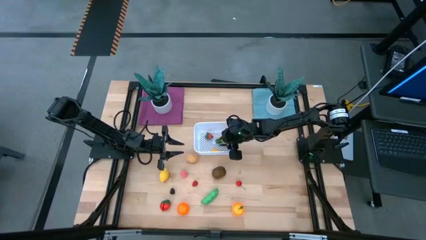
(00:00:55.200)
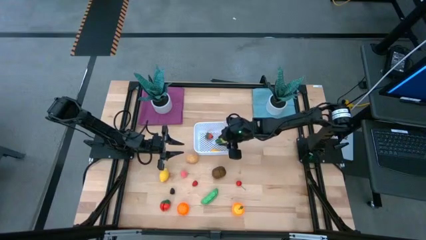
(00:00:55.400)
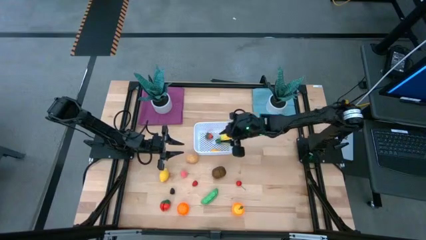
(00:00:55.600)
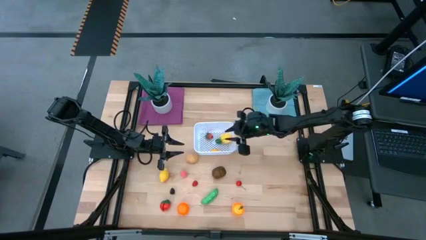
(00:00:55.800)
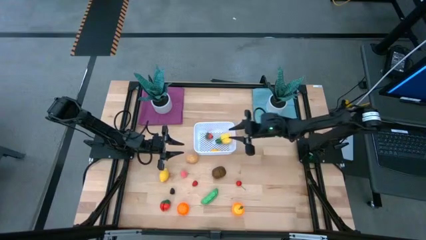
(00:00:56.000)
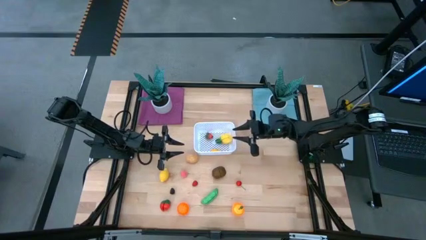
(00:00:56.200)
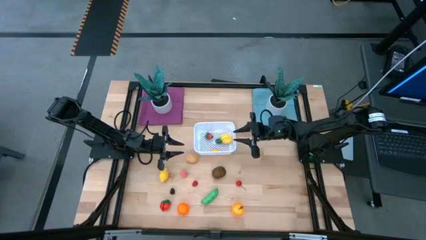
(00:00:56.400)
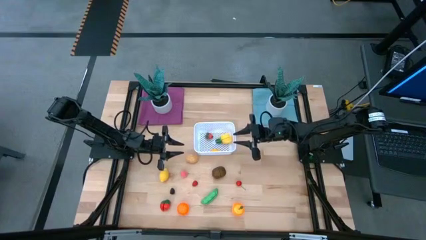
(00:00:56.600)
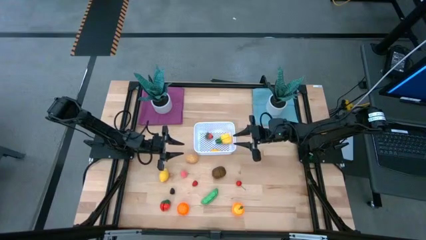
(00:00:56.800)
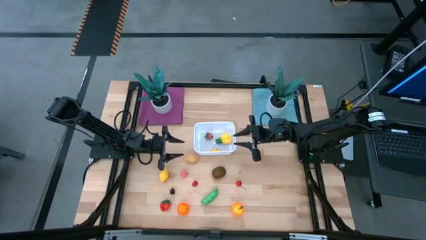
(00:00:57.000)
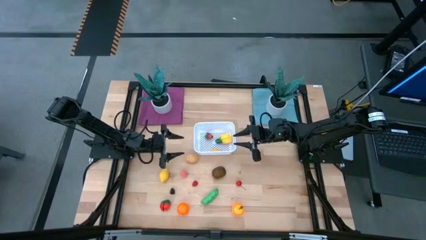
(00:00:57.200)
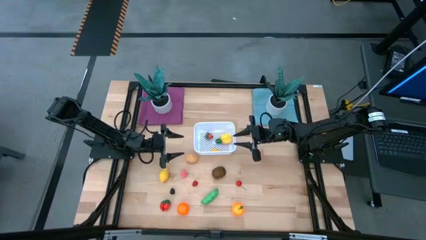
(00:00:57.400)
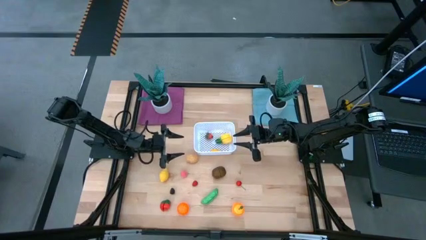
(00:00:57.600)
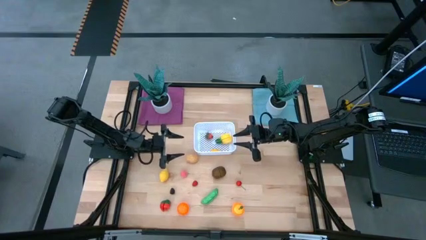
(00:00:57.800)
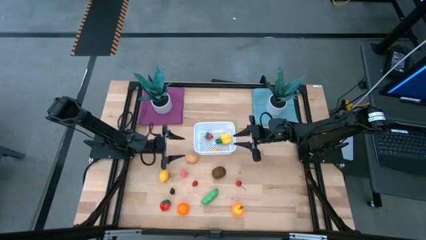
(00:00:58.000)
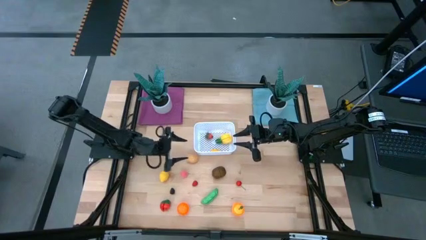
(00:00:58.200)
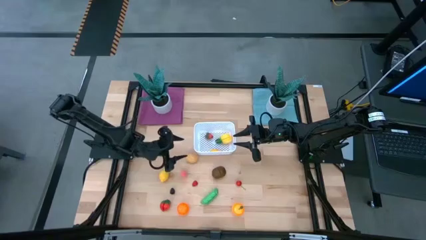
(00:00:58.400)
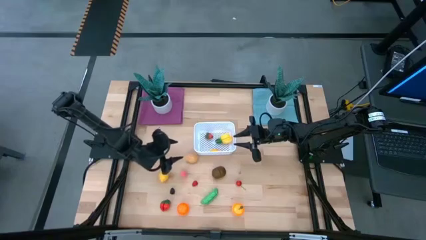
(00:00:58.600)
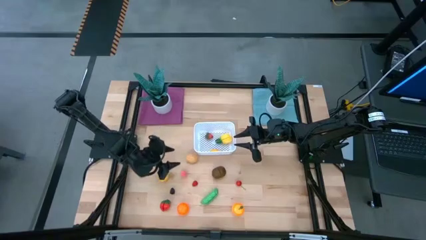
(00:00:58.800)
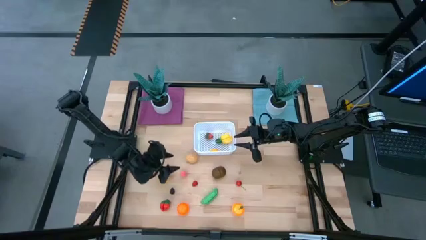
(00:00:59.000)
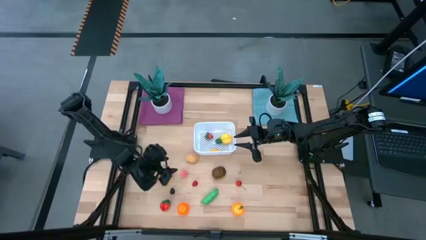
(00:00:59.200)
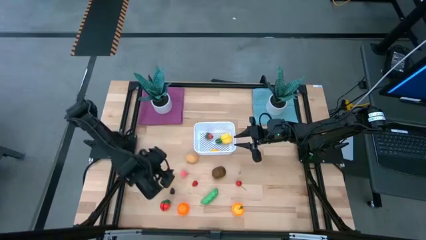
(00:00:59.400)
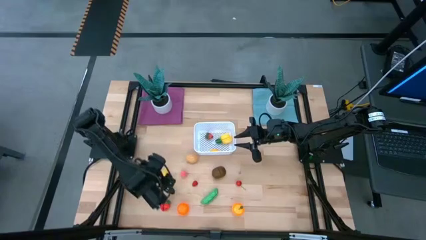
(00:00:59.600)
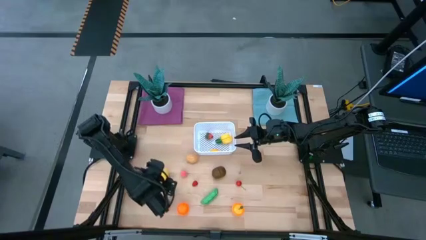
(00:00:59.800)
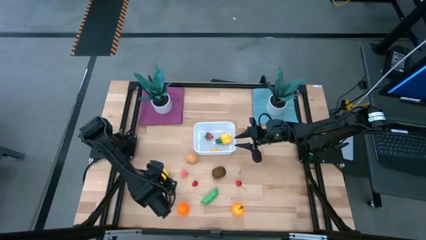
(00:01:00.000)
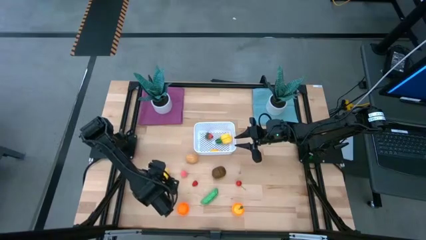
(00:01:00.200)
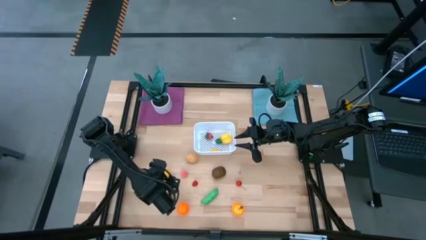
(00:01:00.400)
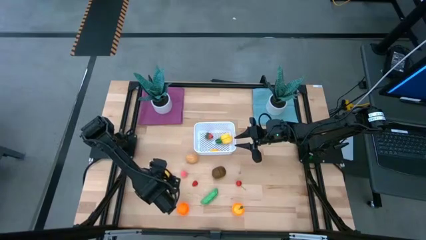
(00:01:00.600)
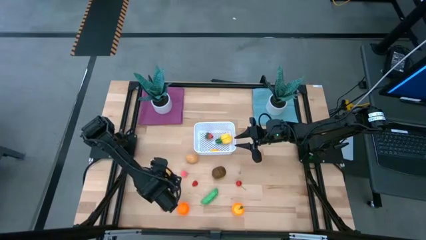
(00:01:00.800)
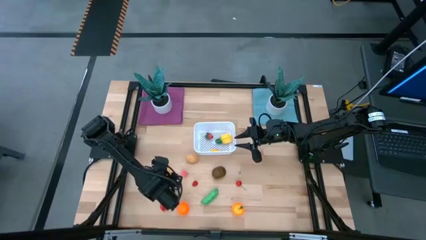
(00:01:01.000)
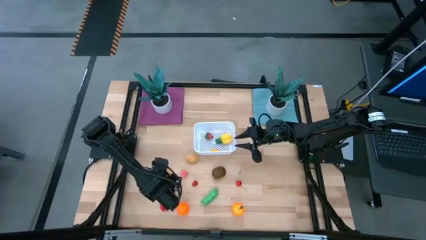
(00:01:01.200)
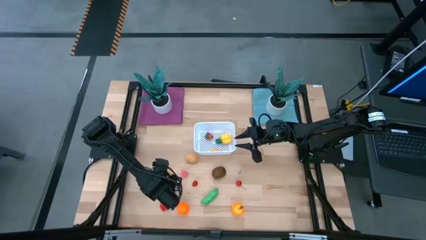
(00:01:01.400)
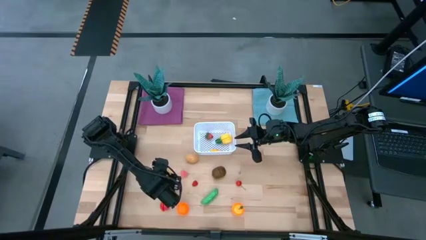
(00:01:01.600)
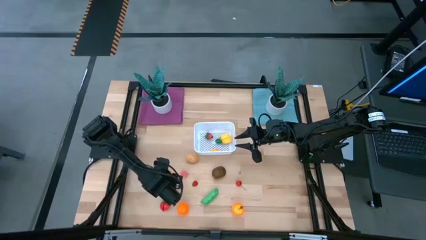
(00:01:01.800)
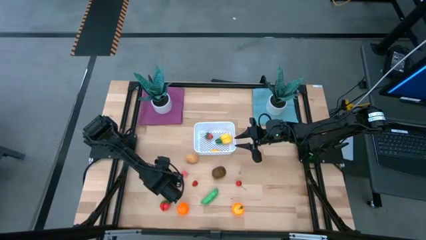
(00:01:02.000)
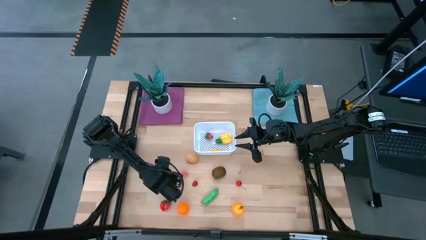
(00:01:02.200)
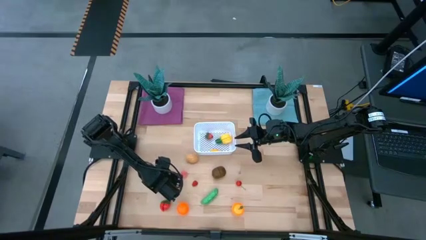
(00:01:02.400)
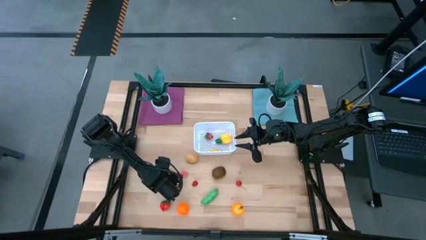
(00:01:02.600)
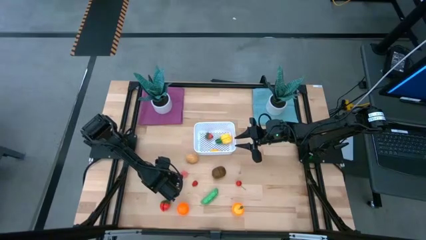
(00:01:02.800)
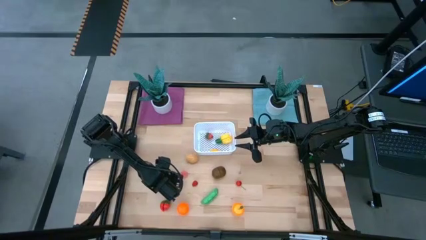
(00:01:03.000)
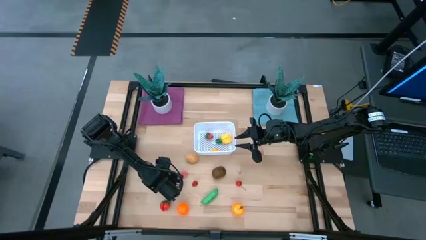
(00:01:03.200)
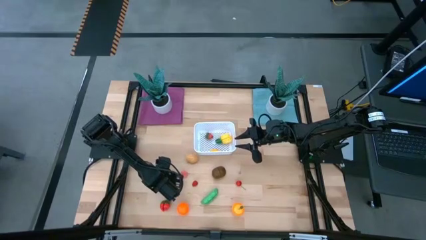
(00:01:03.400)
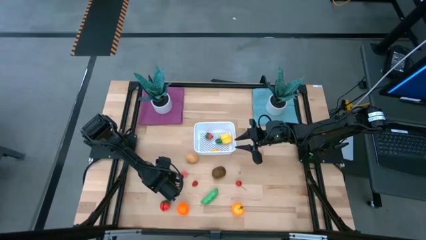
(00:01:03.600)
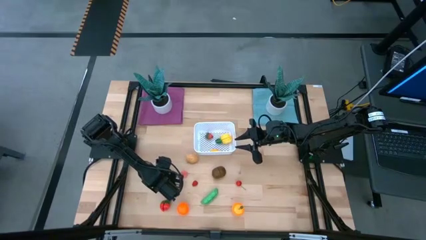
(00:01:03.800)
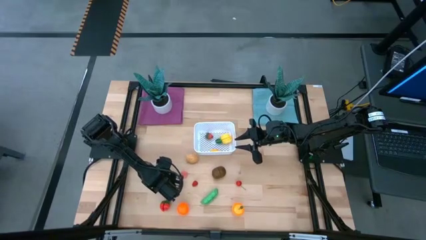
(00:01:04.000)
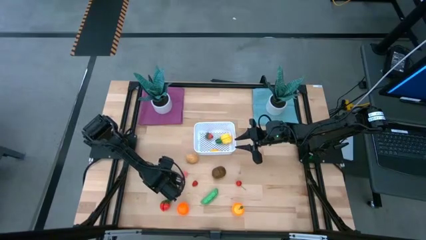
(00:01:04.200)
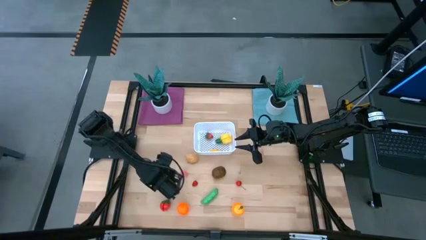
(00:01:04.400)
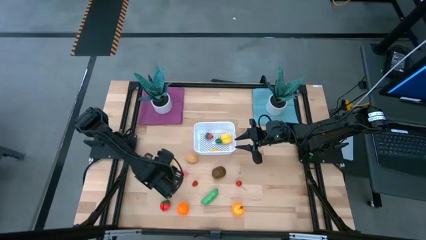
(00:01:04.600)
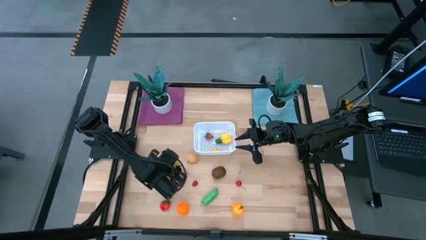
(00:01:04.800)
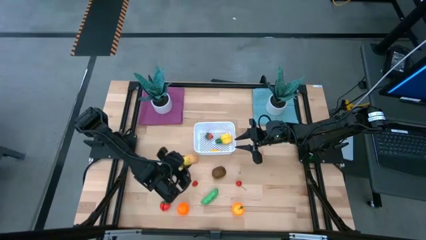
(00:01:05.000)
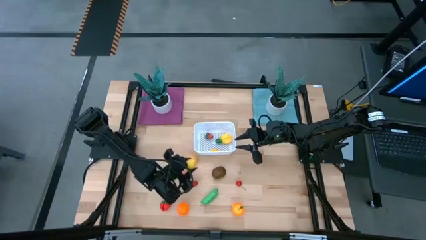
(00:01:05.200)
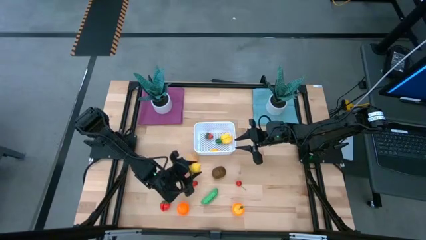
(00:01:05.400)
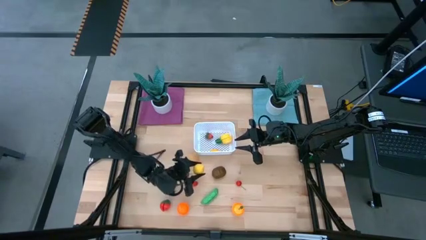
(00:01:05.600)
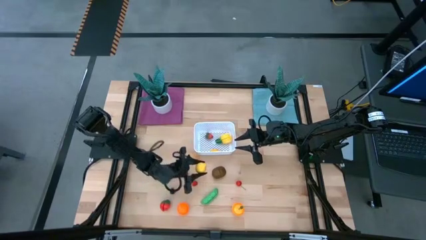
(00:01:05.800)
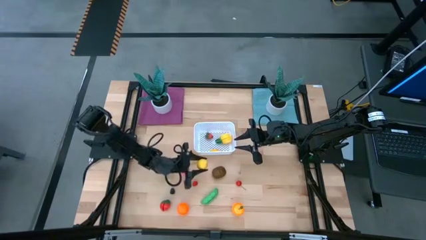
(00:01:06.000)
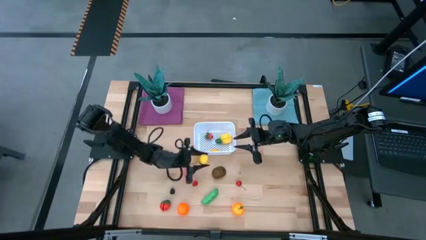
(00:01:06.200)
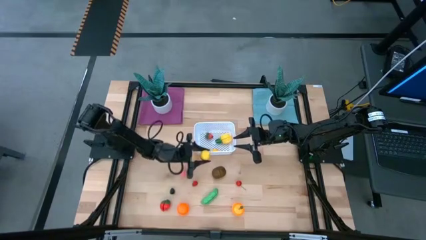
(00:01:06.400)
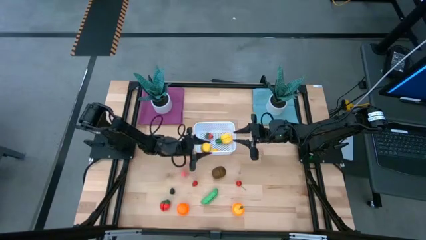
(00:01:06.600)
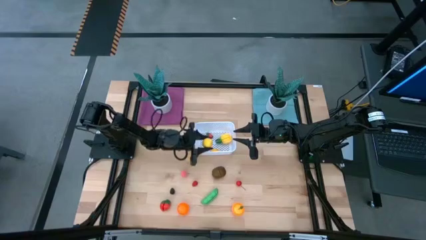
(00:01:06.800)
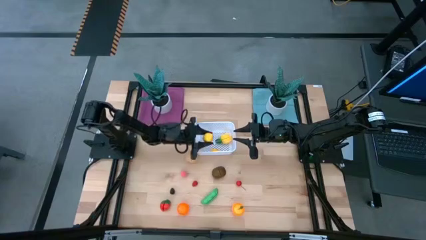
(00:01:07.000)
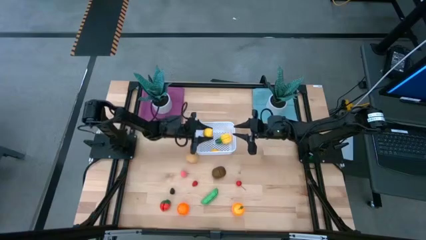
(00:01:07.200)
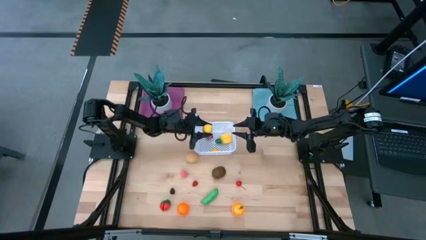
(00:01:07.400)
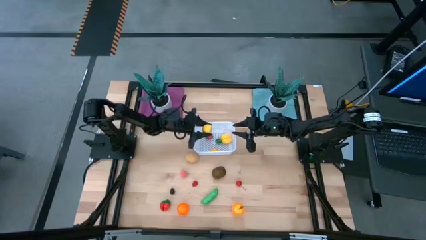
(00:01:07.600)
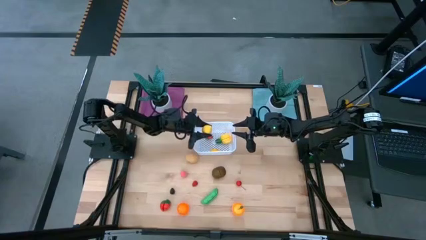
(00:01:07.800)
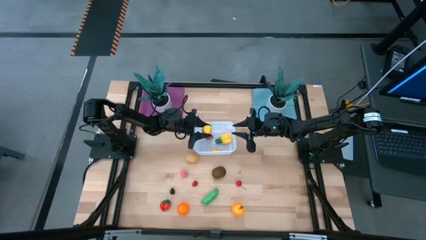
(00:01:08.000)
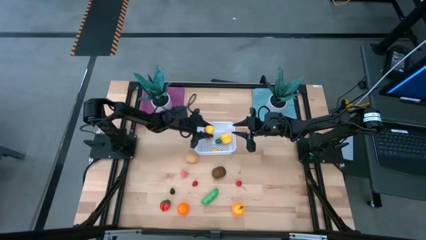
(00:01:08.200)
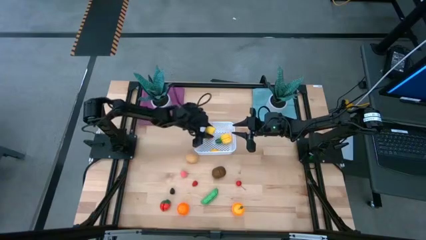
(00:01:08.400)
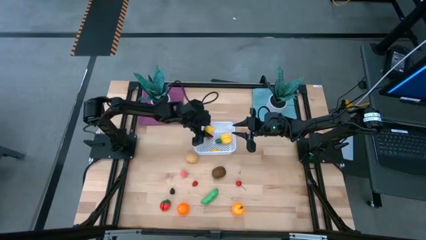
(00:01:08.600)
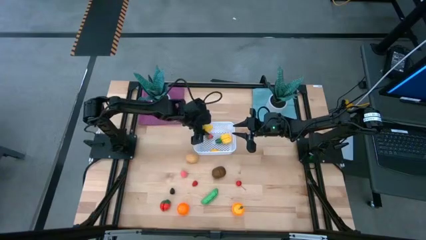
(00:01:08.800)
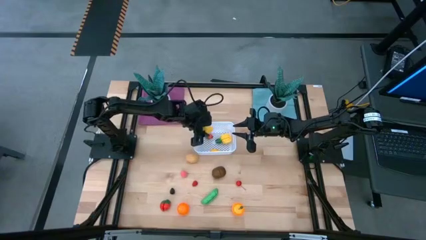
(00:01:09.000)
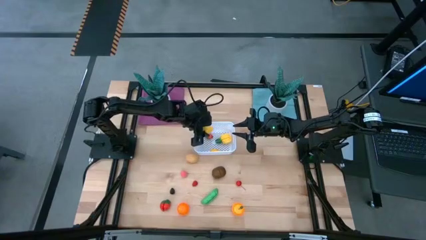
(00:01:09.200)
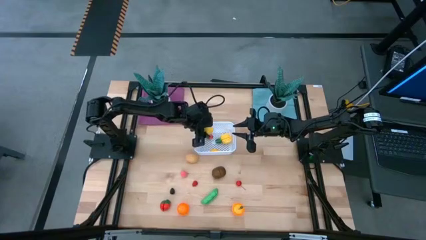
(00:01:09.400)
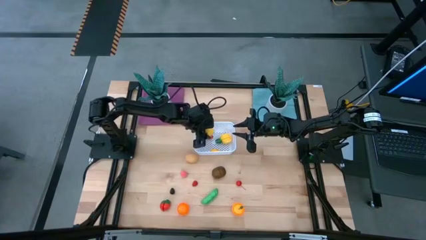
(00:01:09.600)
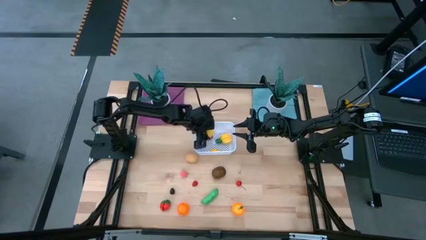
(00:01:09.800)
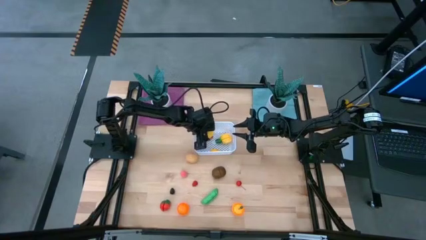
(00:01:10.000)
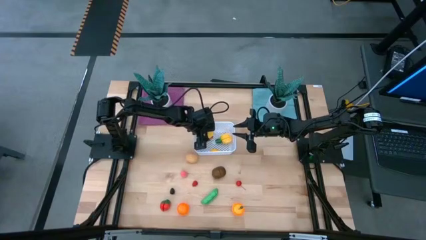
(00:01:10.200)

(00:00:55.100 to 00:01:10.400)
Task: Pick and placing Produce into tupperware
Put the yellow lemon into the white bin
